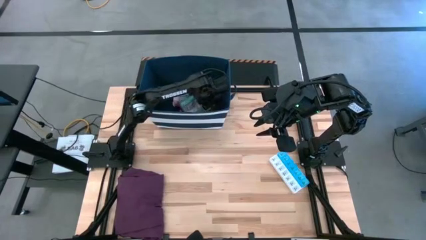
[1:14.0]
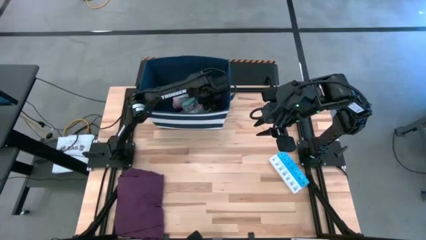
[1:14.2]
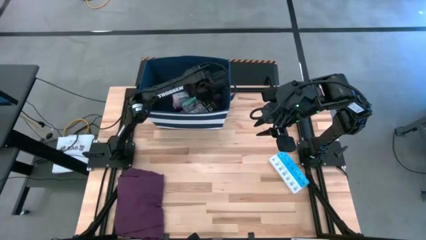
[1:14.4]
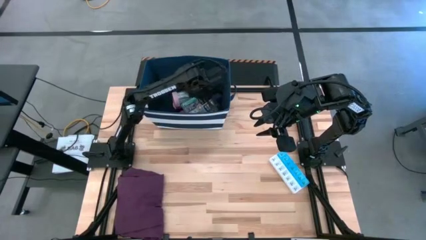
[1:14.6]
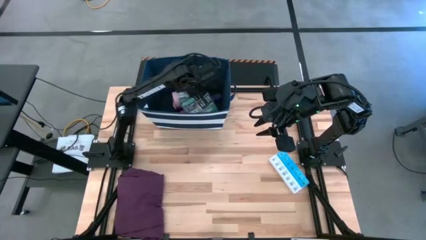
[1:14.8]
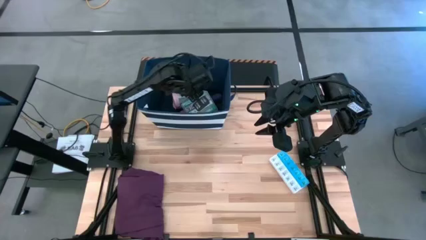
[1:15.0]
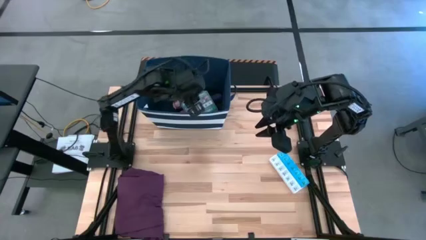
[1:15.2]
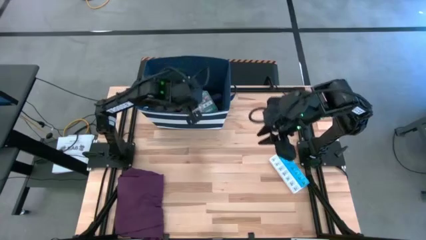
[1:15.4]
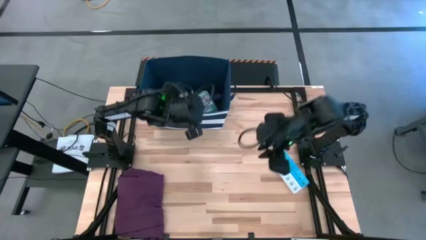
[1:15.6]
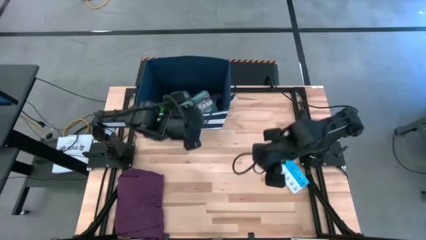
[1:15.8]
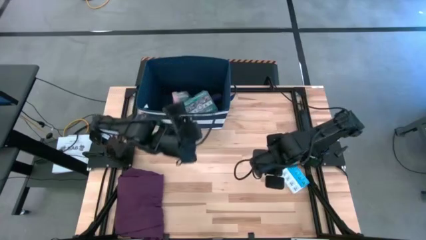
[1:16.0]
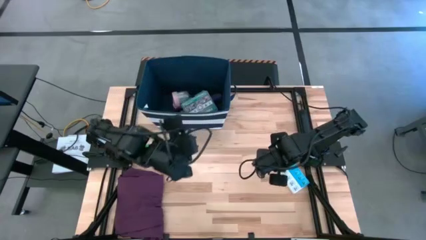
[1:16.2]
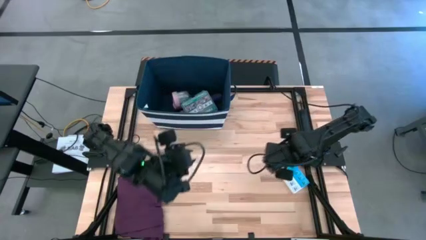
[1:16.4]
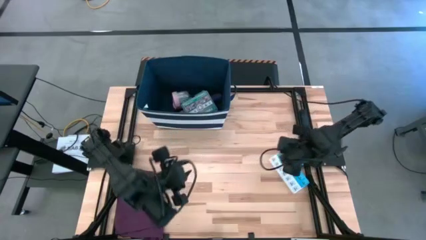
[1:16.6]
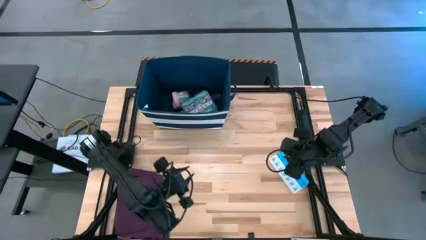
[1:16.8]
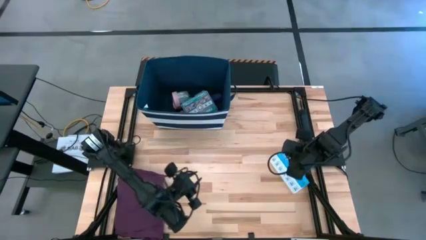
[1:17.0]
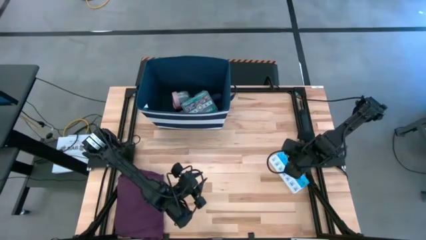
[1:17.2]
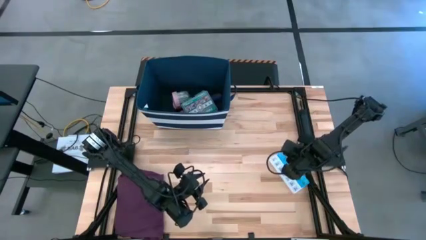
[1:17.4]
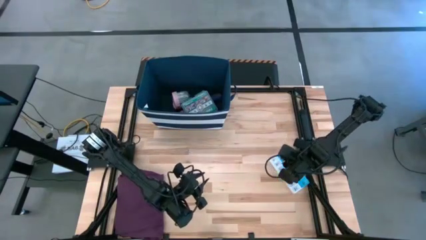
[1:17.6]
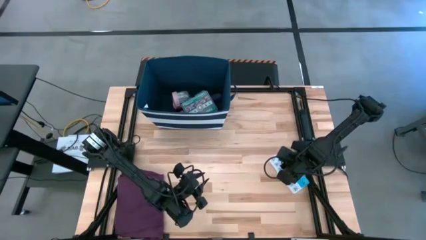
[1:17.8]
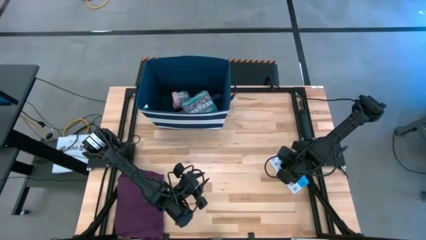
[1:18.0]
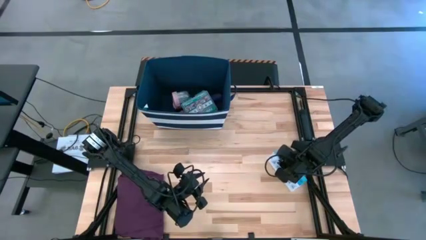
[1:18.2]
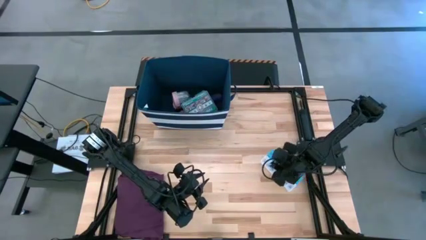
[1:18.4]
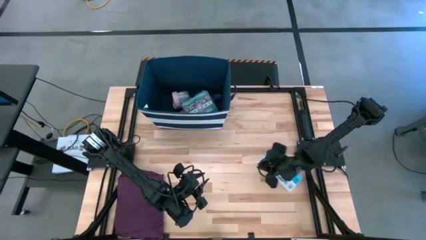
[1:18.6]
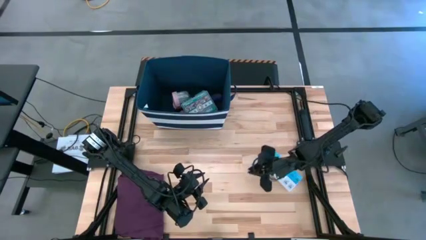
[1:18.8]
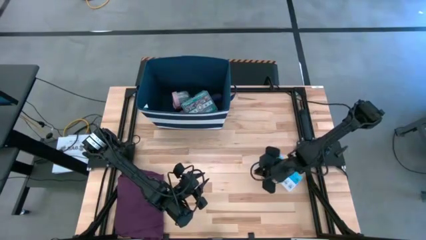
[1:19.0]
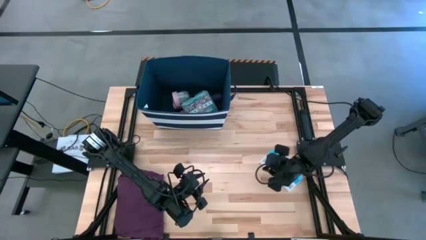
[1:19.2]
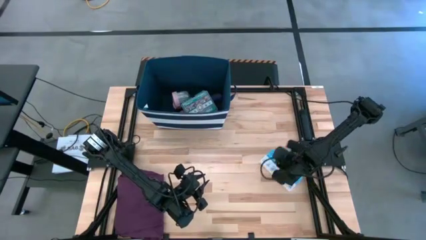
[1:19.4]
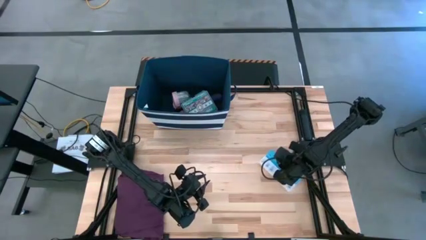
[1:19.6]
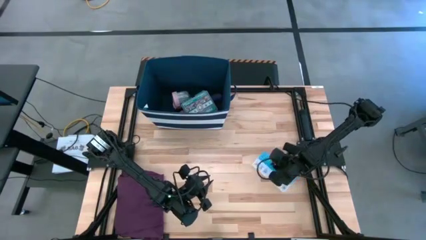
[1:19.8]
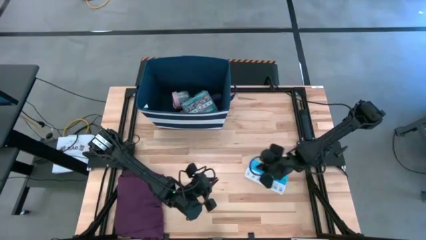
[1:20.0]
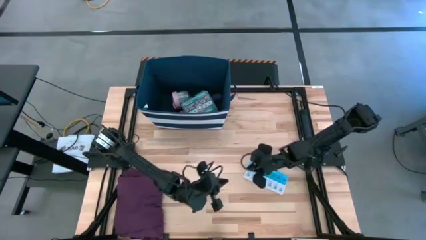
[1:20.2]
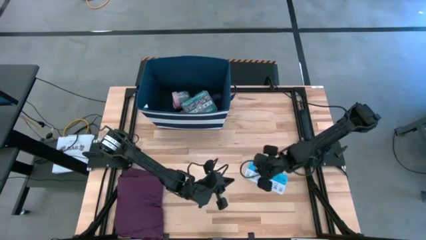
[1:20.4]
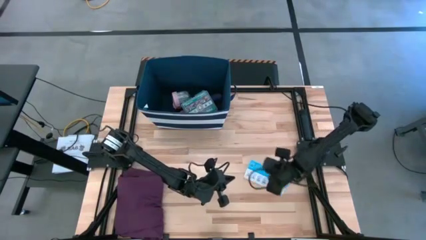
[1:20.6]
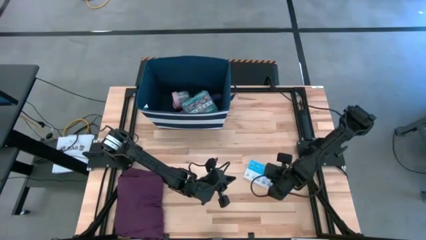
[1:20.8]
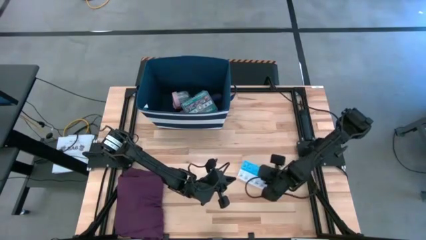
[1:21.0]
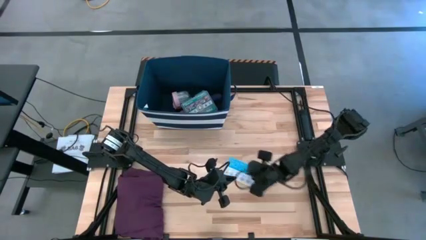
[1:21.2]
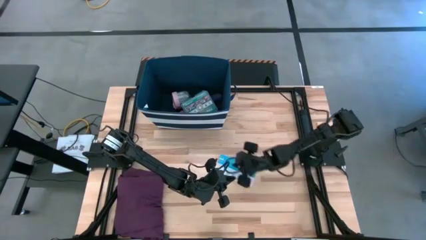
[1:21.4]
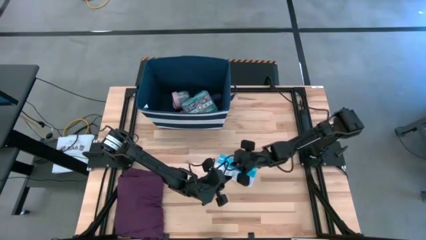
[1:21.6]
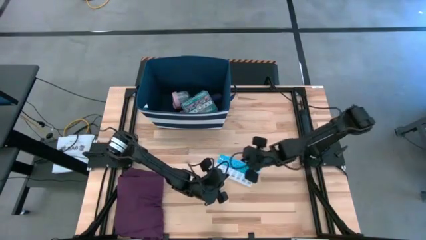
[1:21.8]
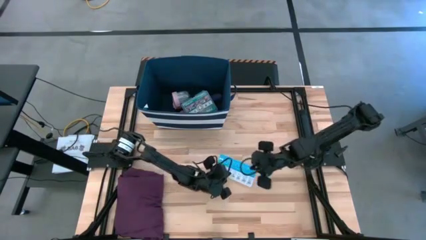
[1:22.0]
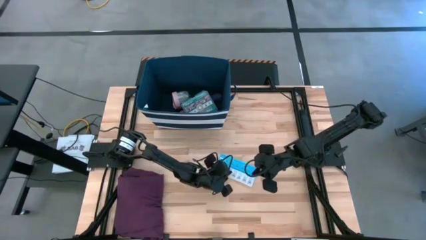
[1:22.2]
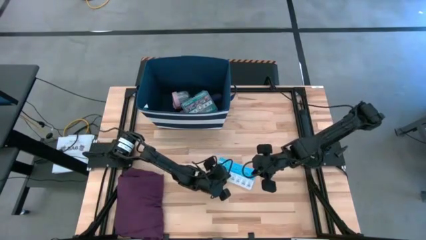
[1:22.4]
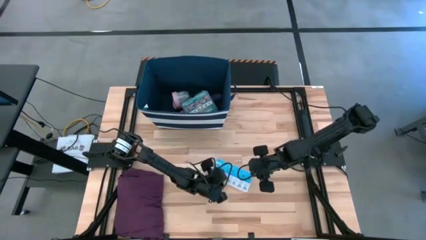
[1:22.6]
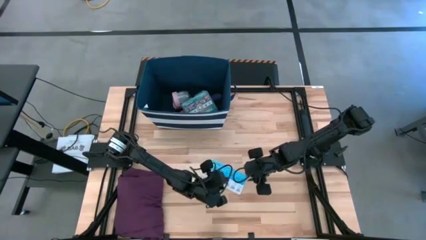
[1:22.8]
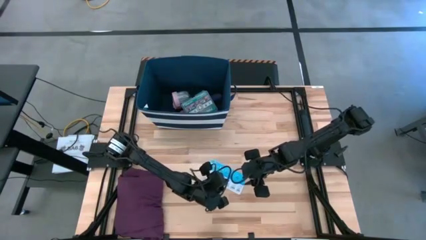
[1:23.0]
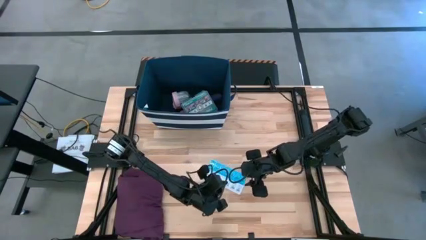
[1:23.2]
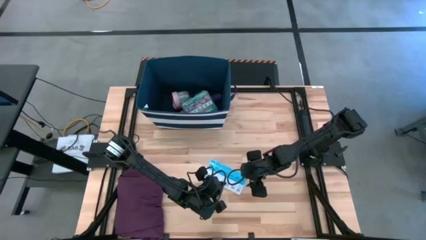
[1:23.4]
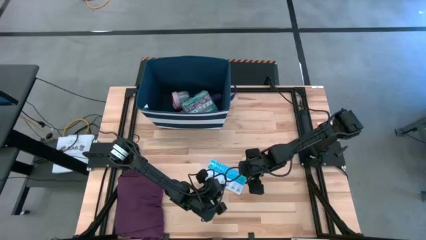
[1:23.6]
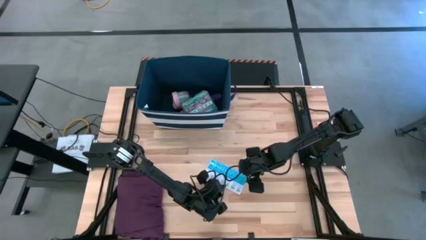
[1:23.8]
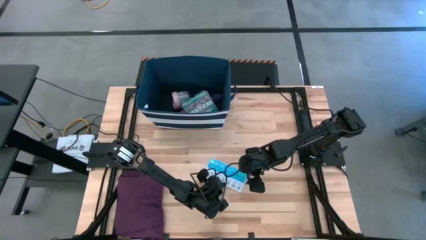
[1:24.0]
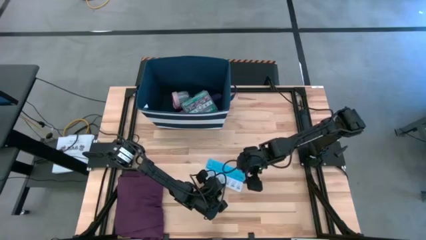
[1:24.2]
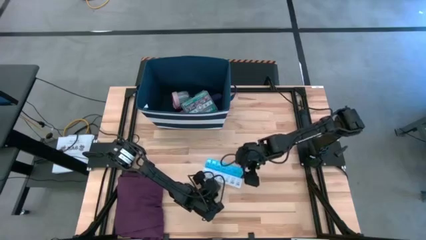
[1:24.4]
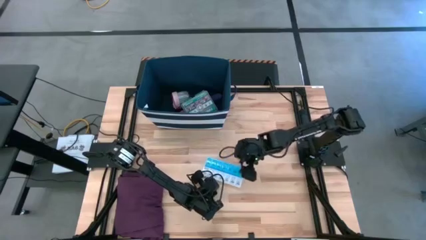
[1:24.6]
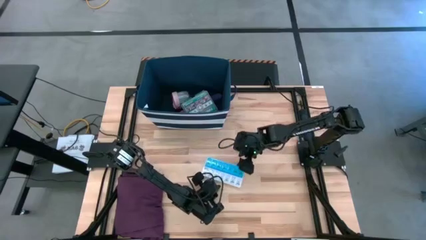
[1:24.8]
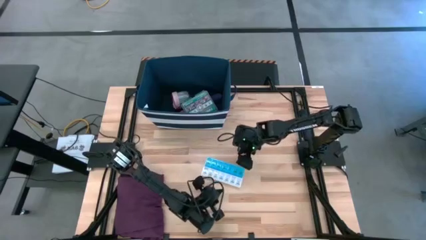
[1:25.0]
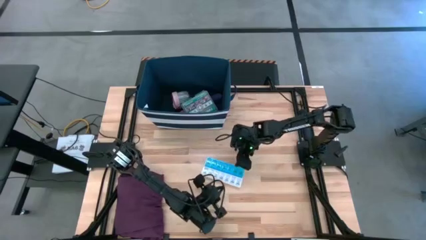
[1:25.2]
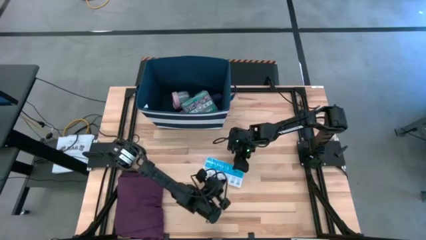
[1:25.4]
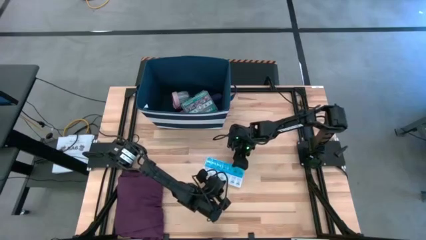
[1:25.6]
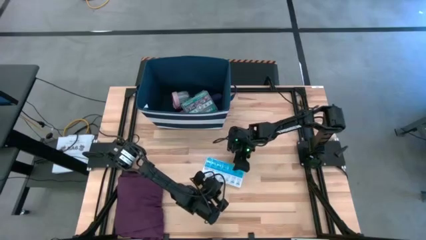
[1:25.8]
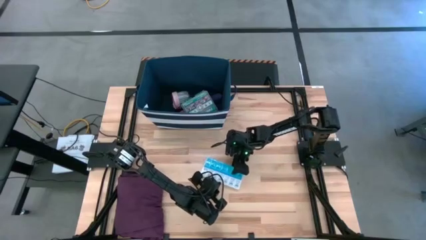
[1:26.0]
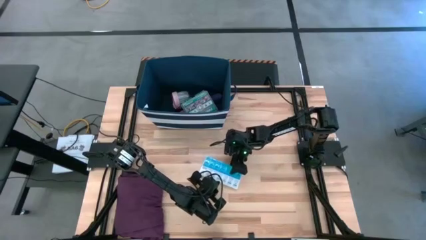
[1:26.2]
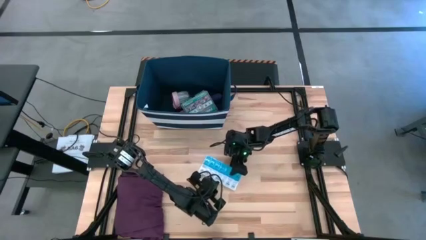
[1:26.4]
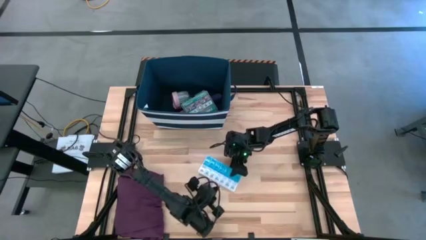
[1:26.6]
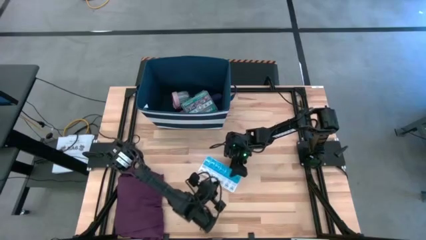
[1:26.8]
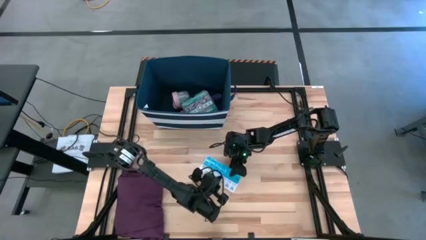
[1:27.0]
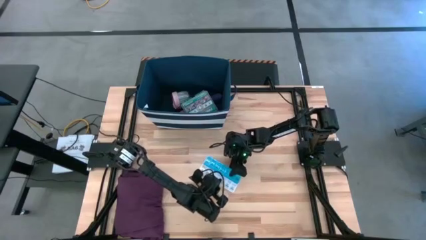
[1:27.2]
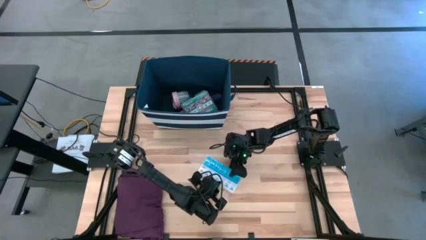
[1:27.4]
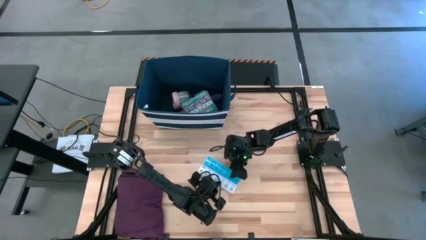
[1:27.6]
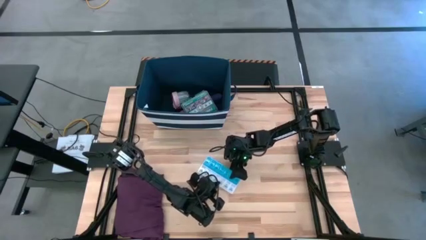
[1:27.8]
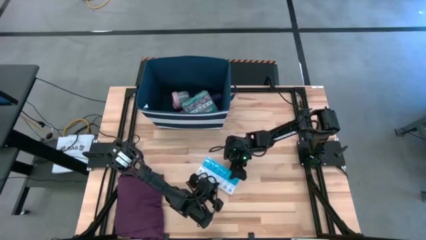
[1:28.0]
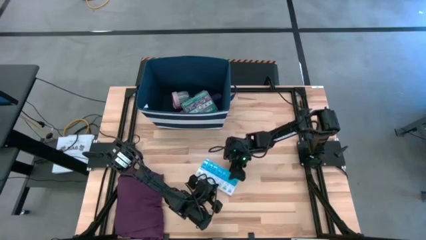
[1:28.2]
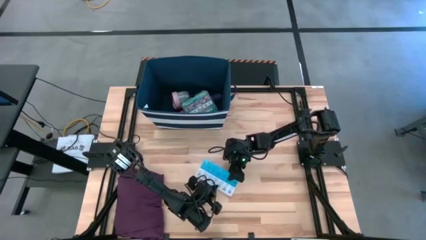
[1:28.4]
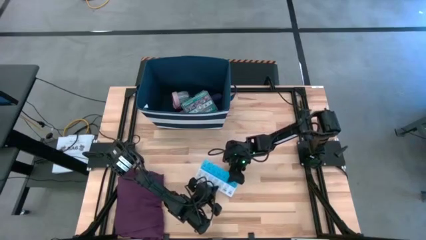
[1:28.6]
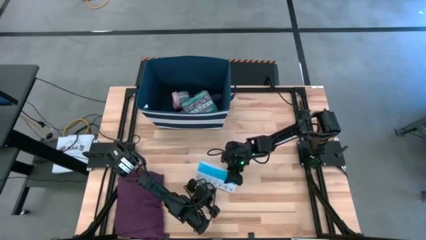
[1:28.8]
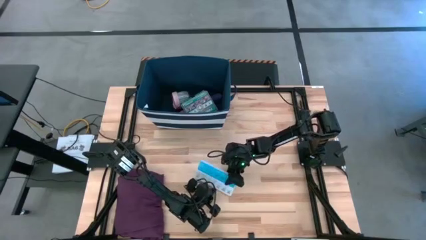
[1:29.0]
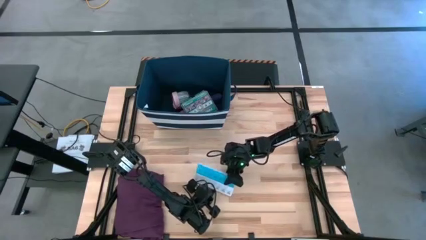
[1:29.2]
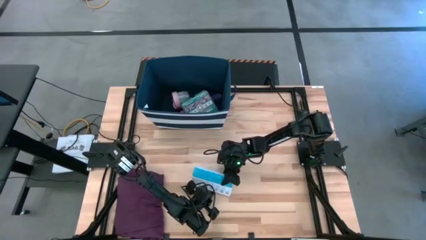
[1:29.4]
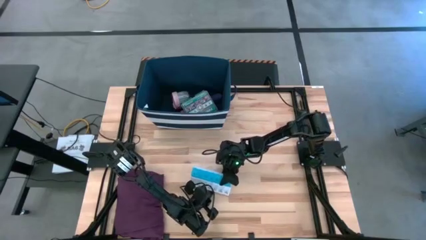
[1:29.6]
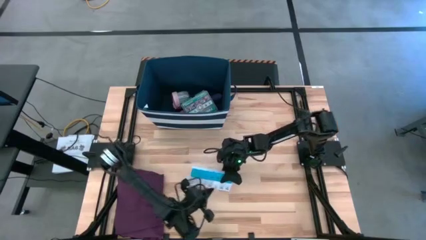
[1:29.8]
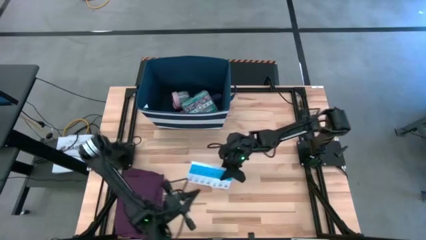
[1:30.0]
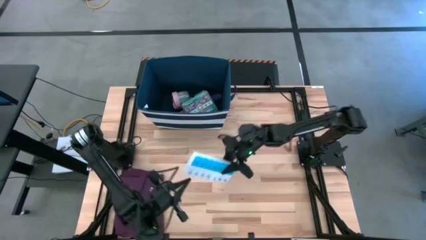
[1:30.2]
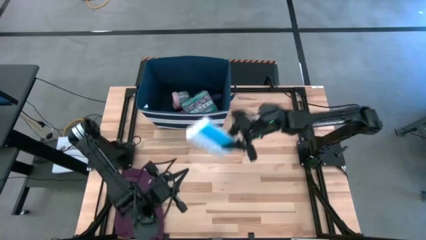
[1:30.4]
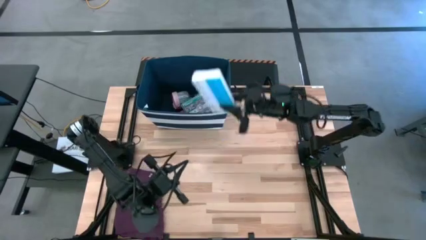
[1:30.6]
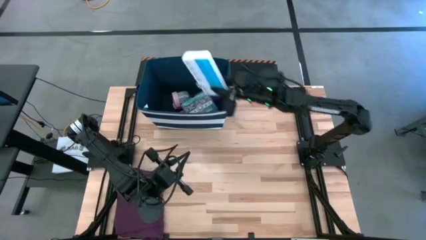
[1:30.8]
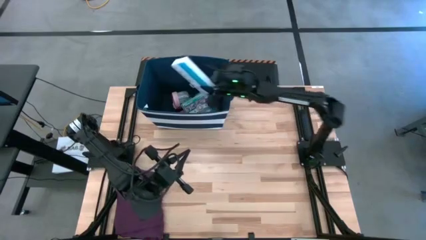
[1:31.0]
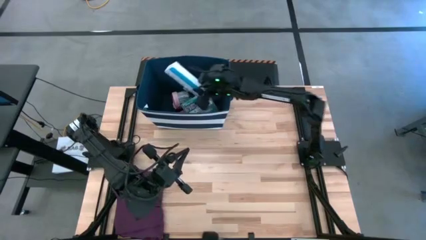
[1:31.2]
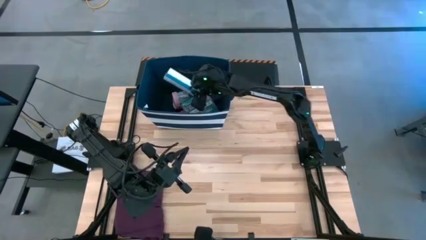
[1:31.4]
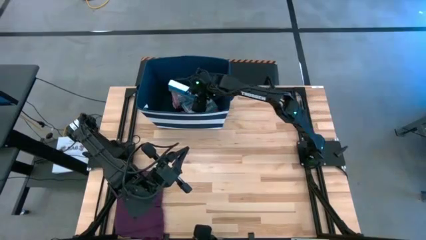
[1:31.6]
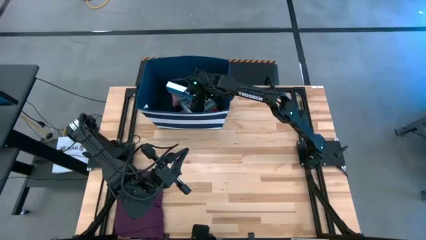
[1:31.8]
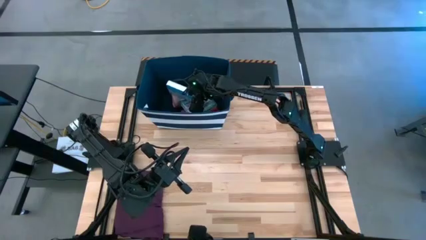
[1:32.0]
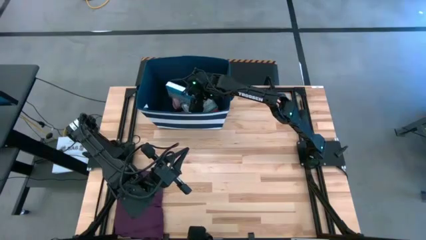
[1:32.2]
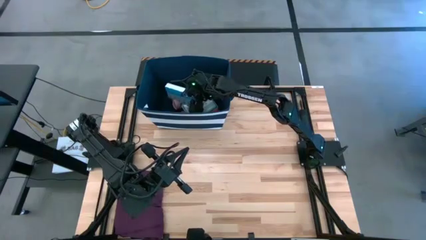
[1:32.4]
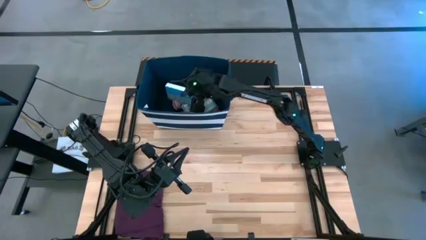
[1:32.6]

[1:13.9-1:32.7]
Task: Pick & place medical supplies in basket/bin
Put the blue medicine organizer into the blue bin
